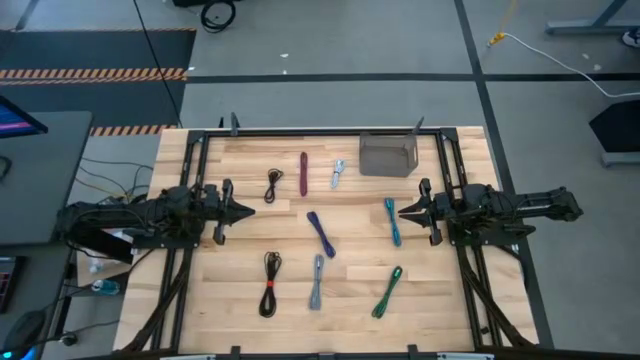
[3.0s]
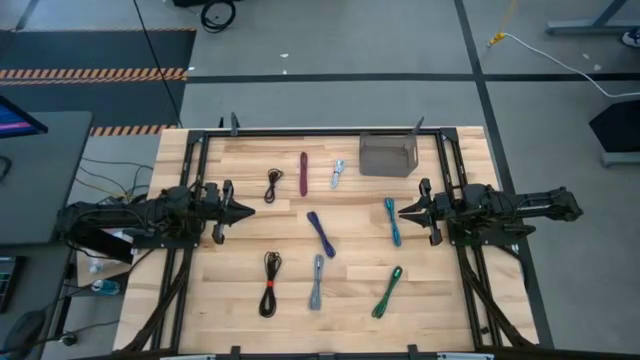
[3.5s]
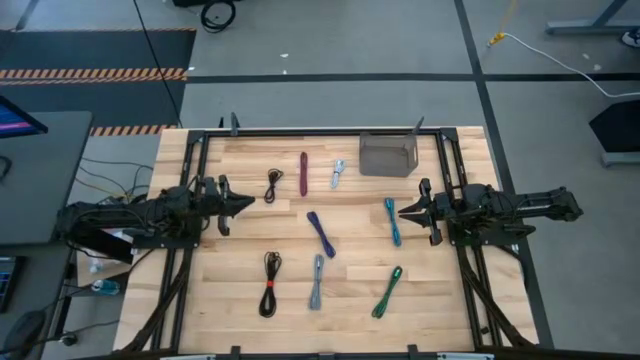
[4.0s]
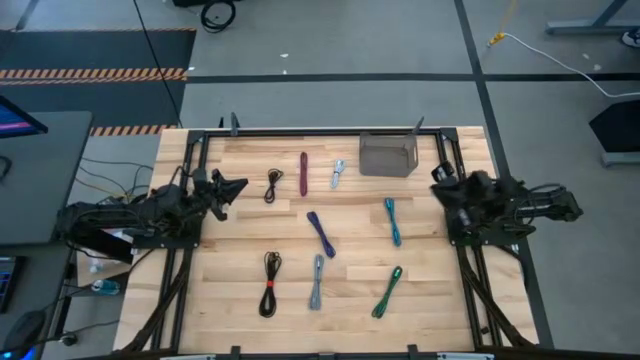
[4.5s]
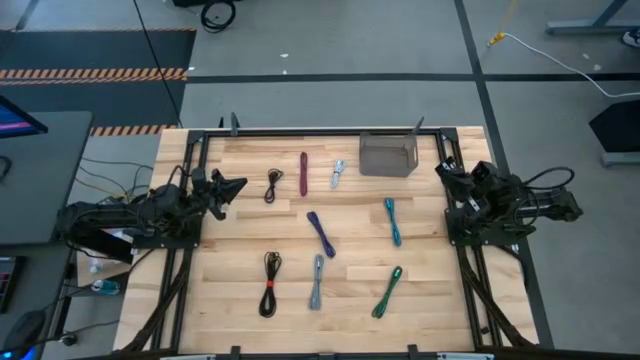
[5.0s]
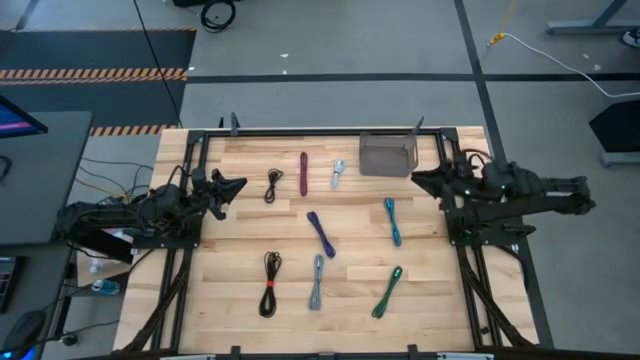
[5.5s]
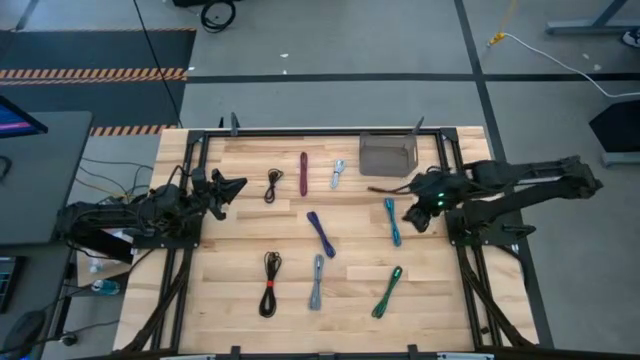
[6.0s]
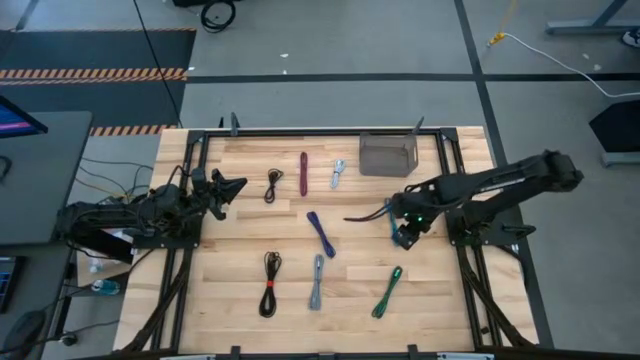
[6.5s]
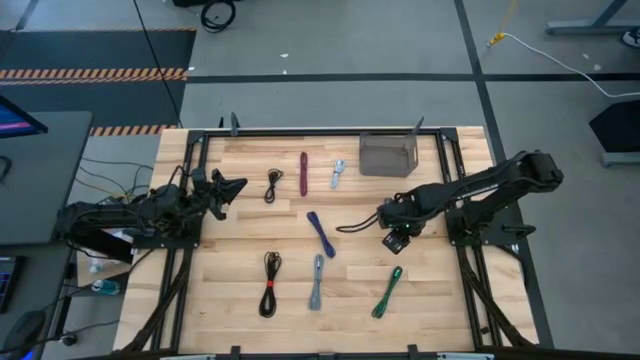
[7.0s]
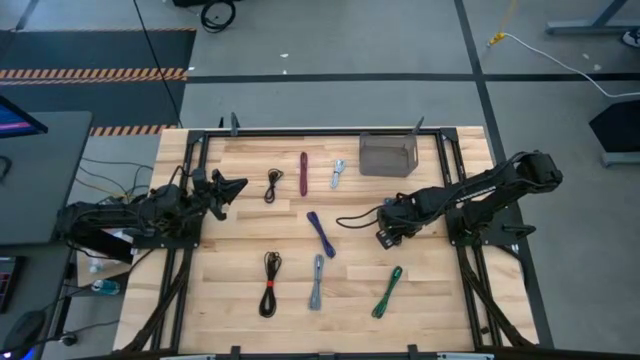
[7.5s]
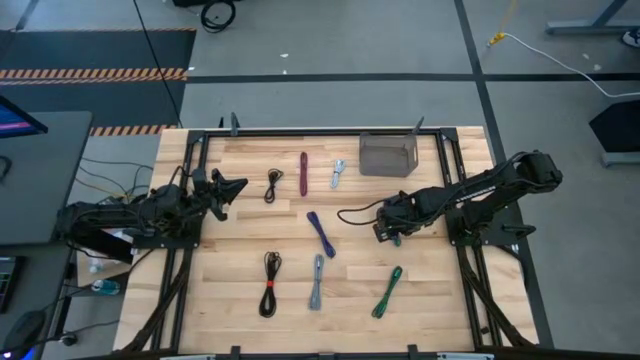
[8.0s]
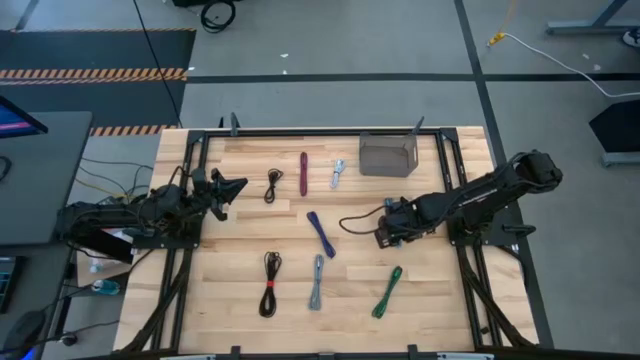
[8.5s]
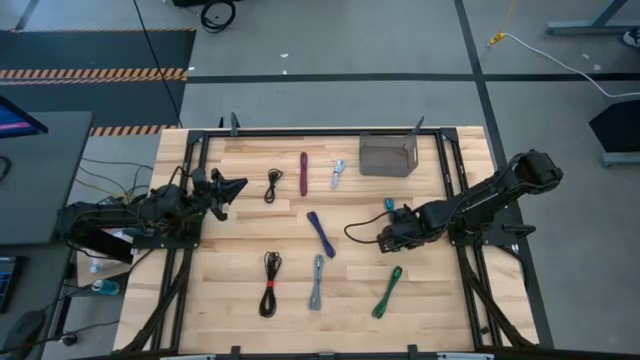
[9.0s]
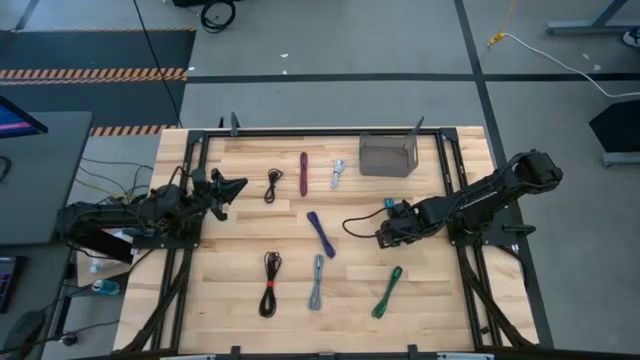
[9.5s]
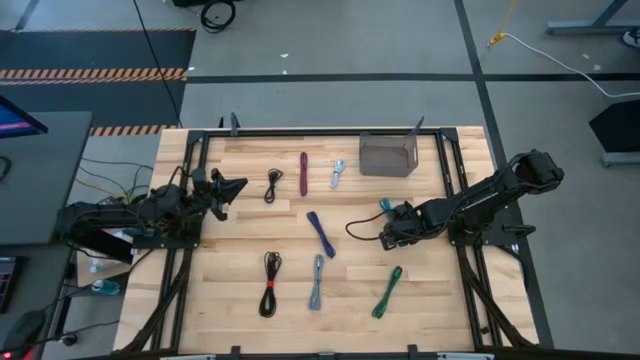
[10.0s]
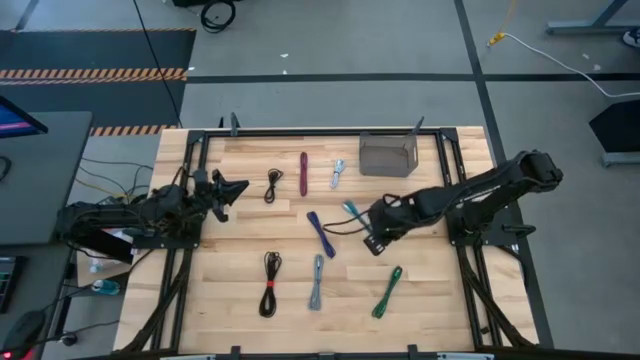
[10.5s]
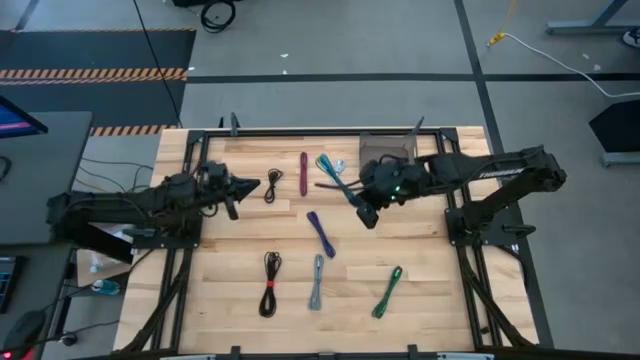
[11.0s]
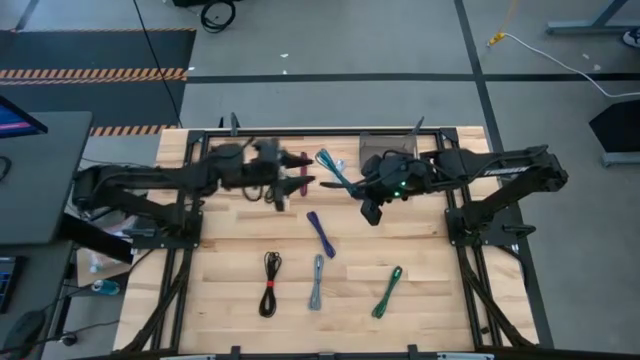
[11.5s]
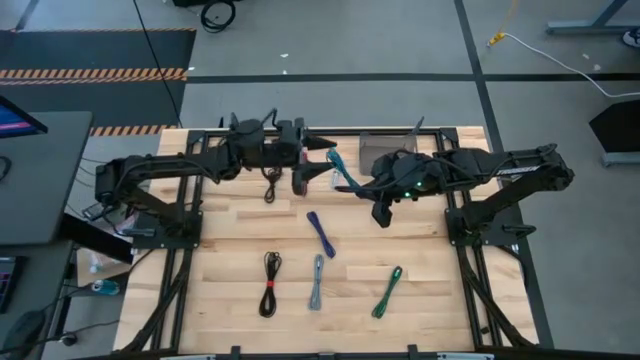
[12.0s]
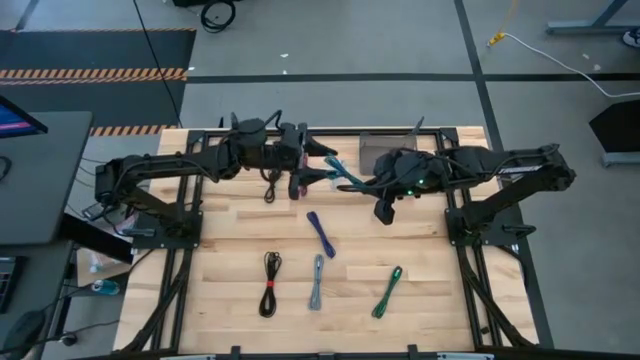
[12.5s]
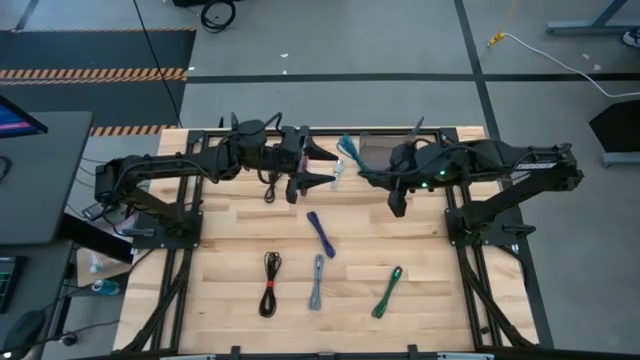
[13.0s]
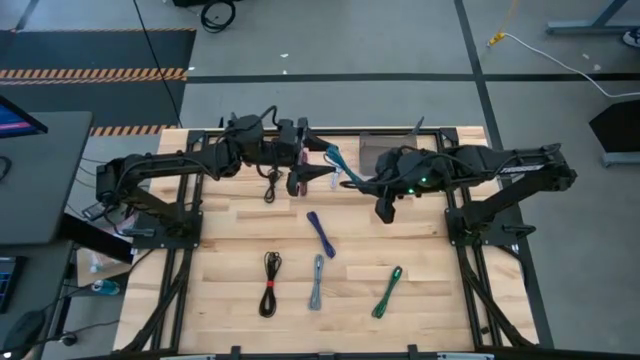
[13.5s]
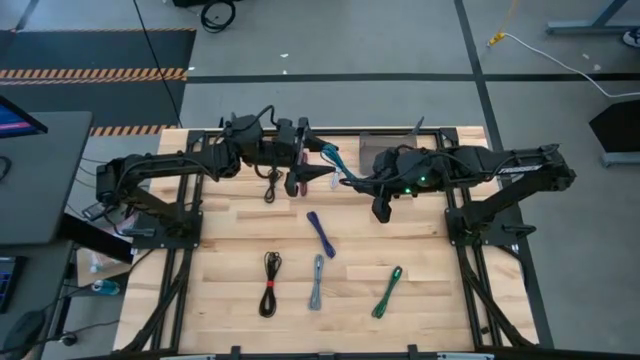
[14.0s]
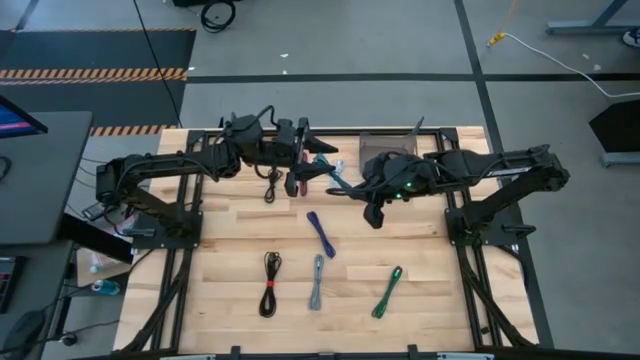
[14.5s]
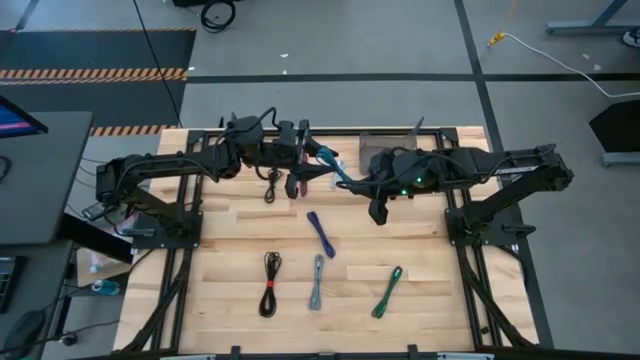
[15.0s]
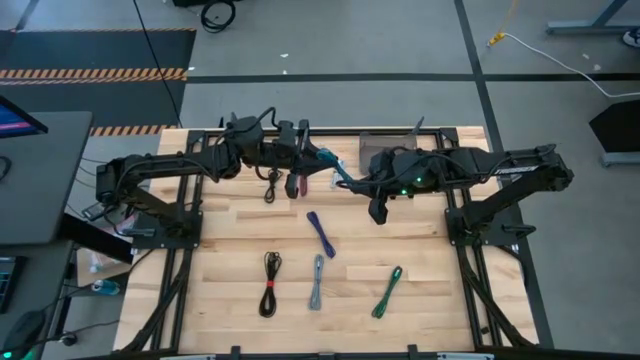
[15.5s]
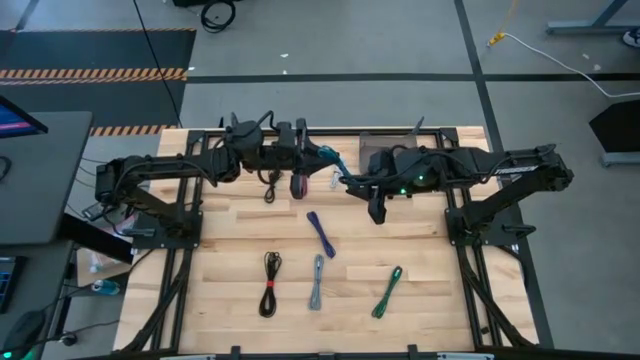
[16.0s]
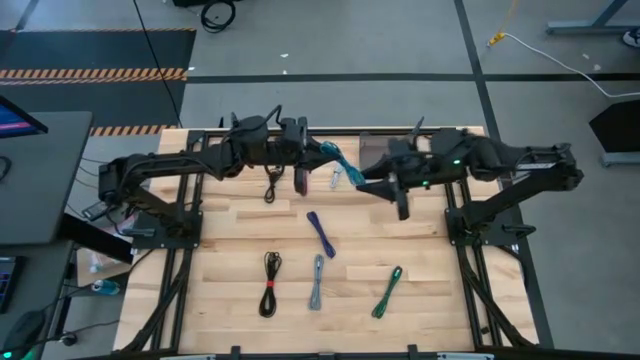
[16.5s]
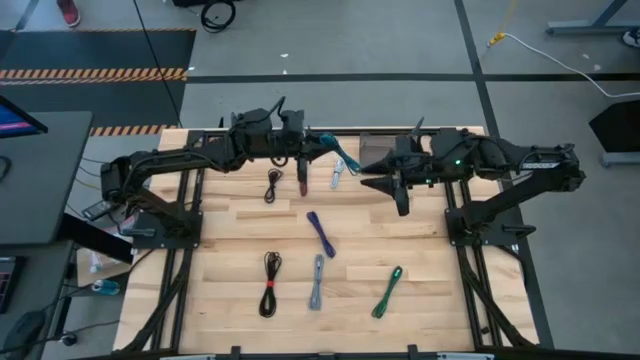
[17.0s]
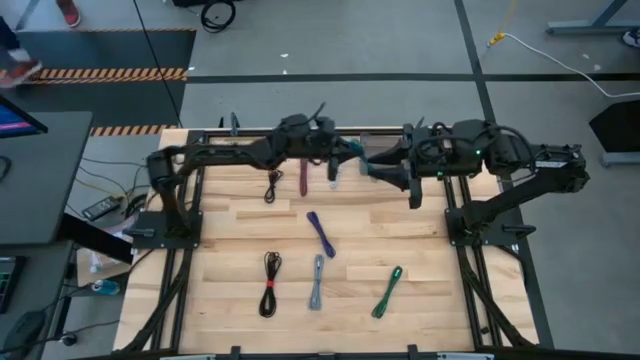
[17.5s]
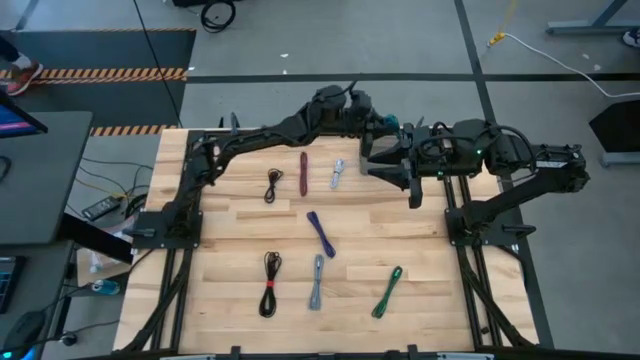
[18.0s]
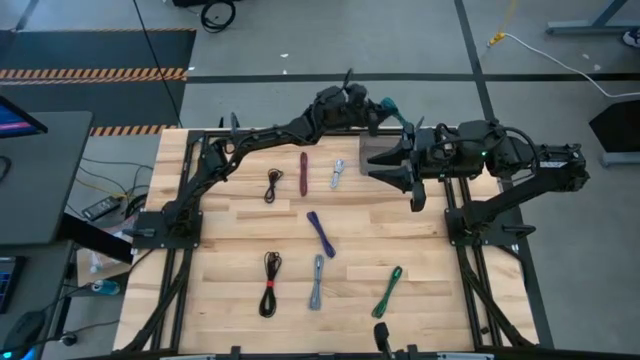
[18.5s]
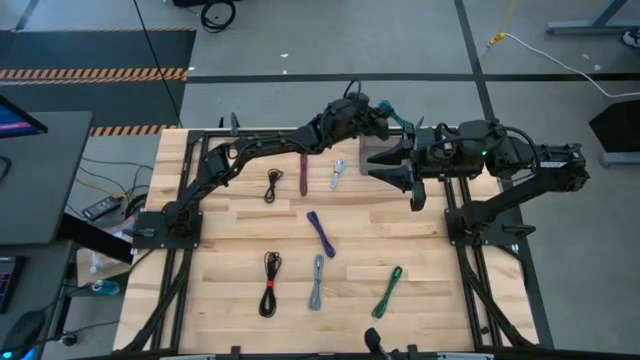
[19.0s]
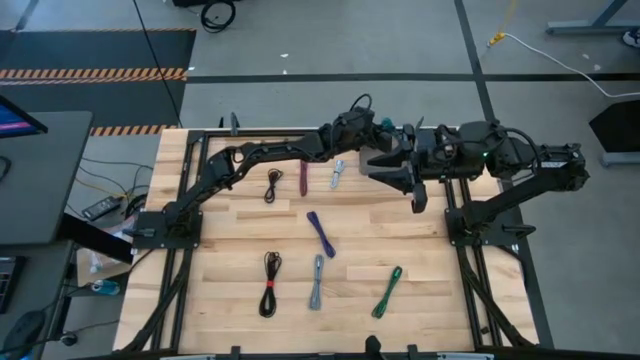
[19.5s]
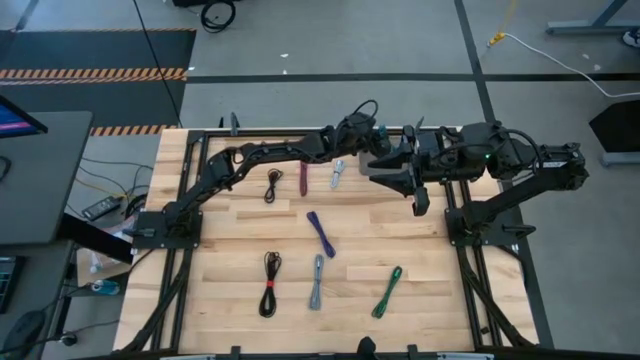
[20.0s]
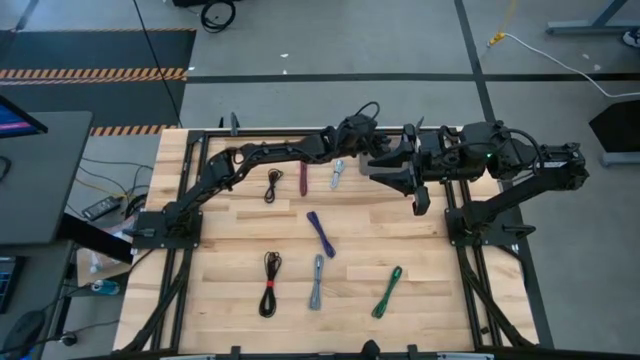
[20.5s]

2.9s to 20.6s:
Task: Pick and place USB-C Cables
Put the black and blue charger cable into the black bin

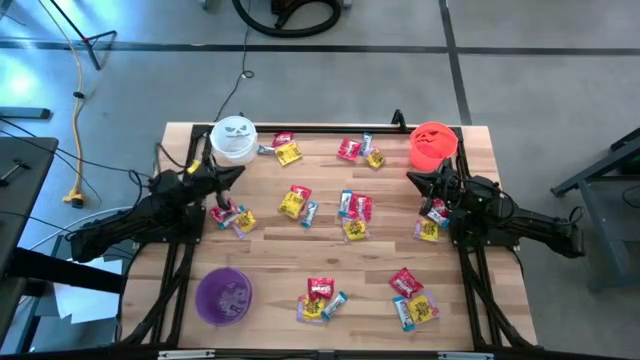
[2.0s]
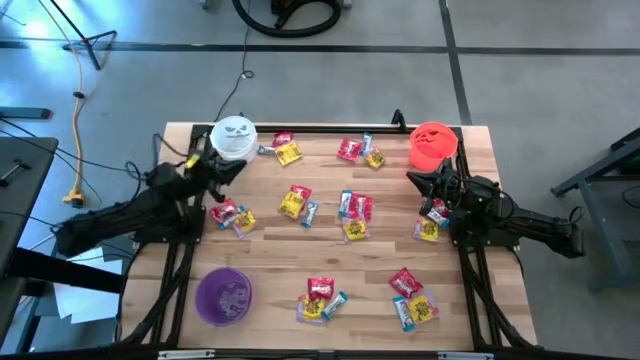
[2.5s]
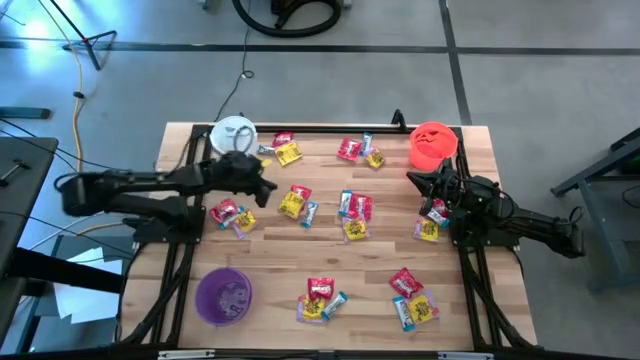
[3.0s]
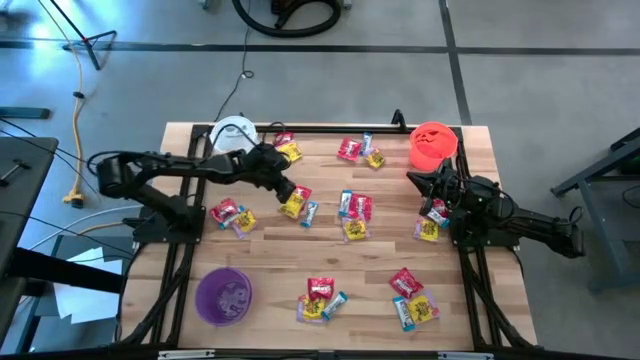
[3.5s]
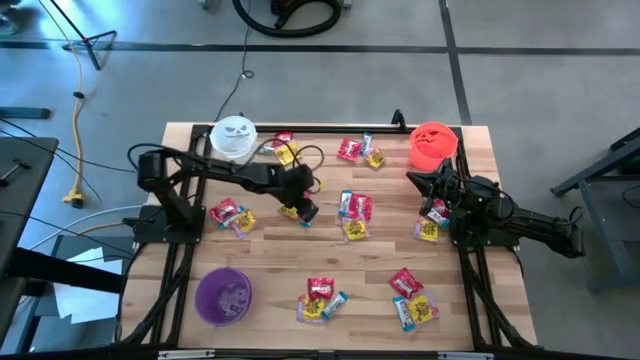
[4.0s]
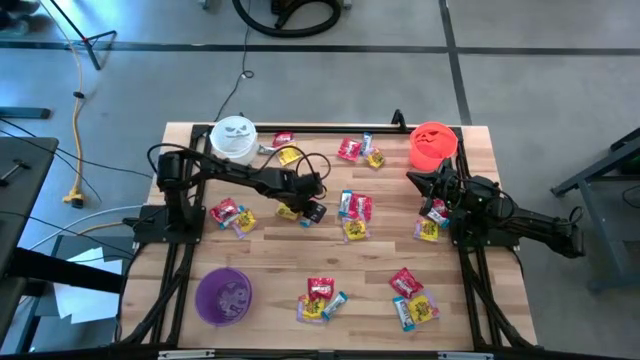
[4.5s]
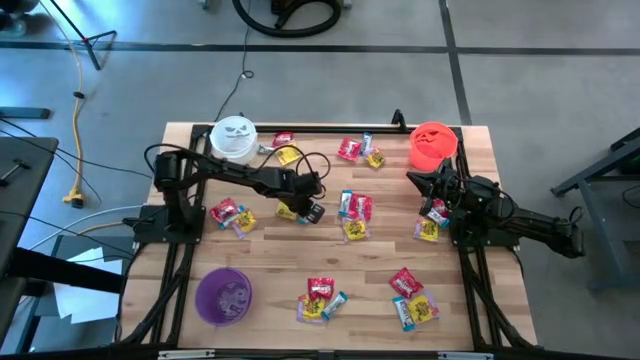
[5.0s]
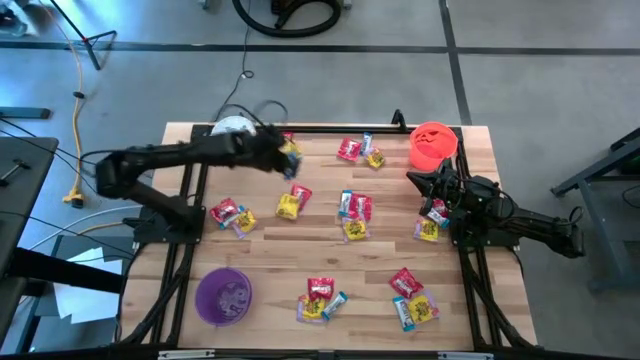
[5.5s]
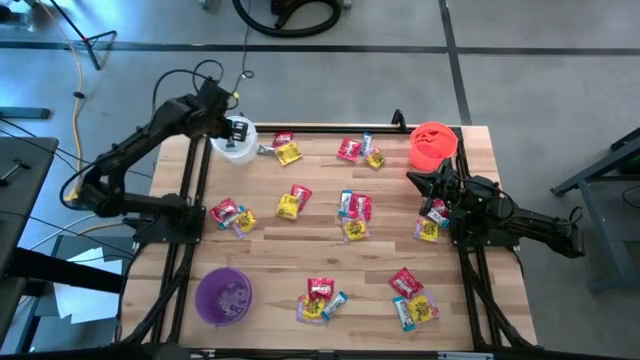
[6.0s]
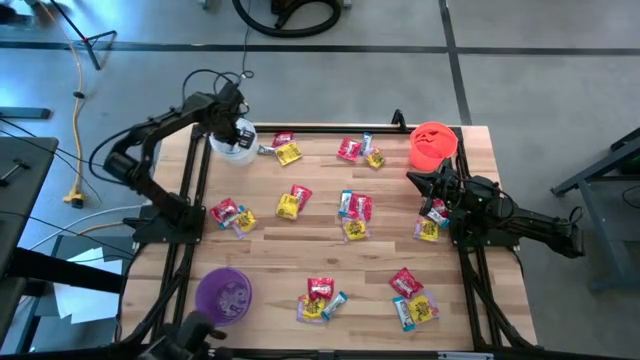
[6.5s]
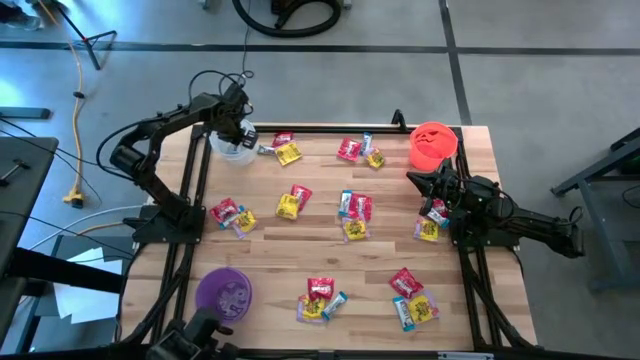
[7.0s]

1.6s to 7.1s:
Task: Sort candy
Put the white candy into the white bucket
